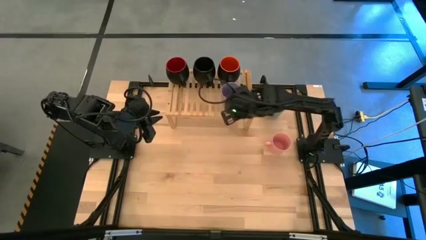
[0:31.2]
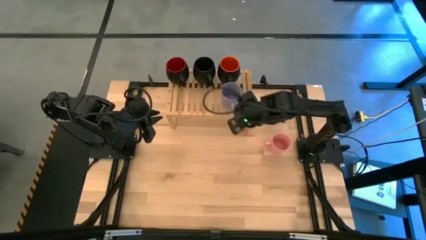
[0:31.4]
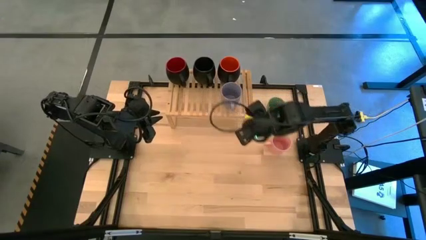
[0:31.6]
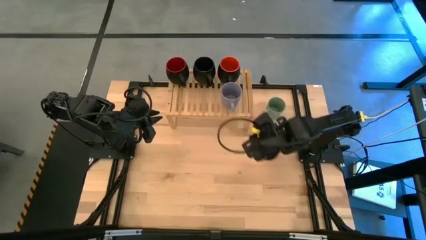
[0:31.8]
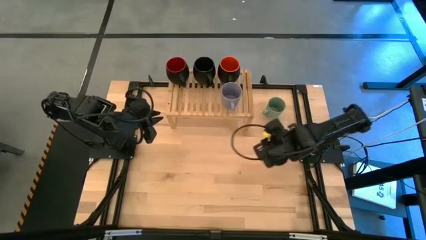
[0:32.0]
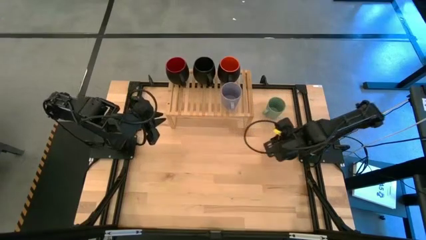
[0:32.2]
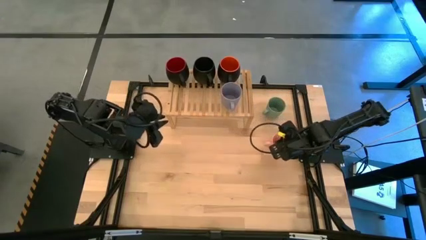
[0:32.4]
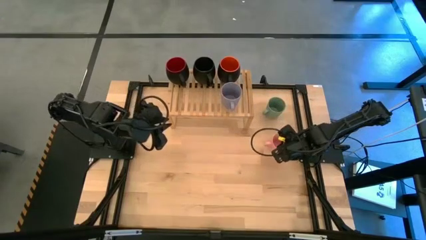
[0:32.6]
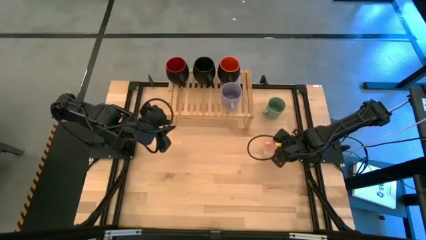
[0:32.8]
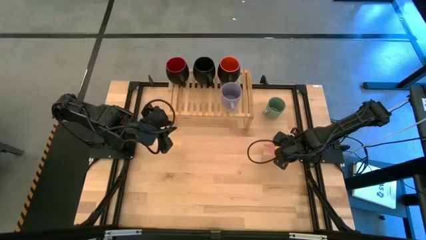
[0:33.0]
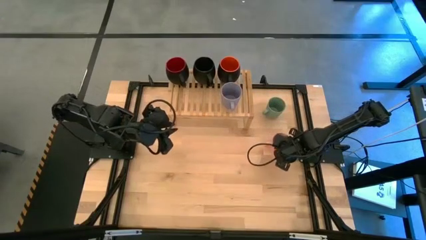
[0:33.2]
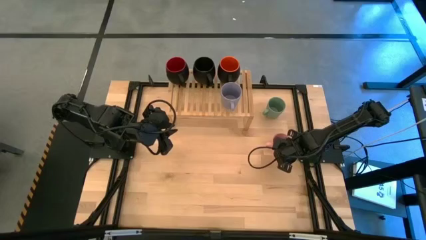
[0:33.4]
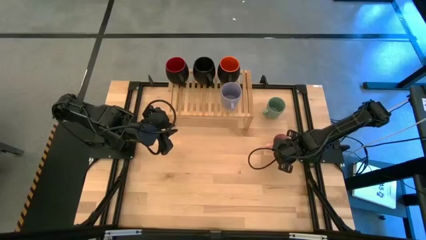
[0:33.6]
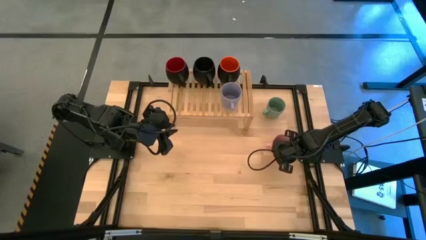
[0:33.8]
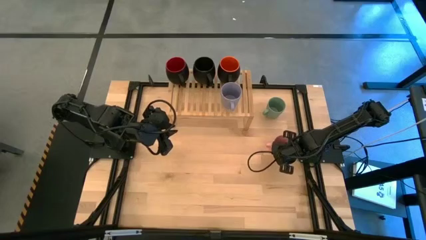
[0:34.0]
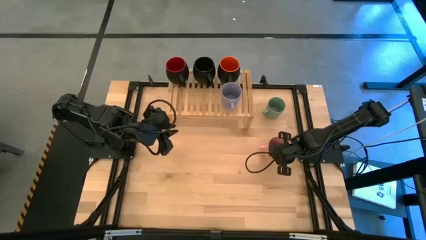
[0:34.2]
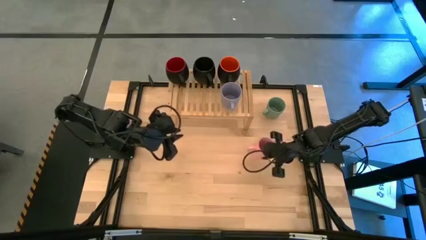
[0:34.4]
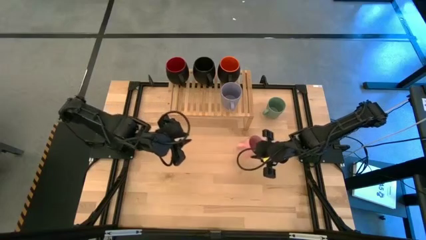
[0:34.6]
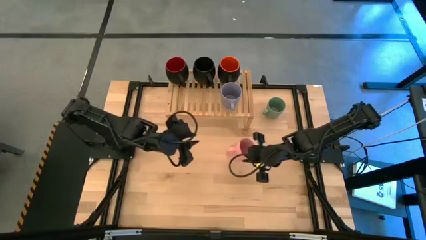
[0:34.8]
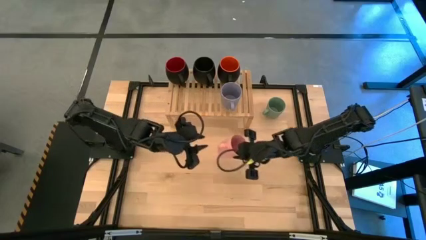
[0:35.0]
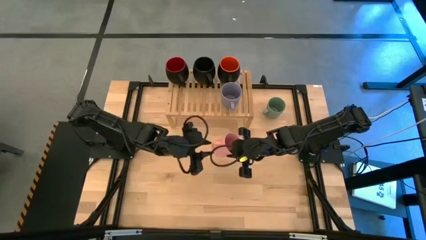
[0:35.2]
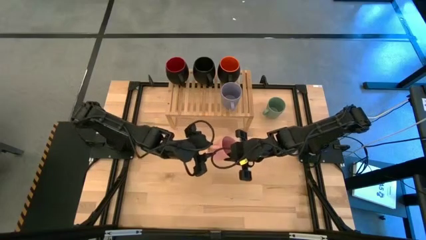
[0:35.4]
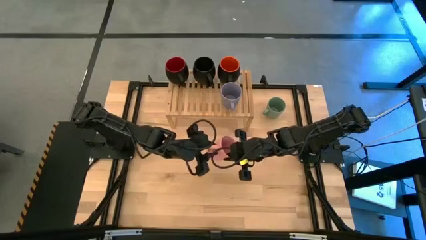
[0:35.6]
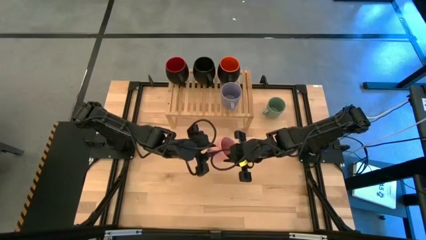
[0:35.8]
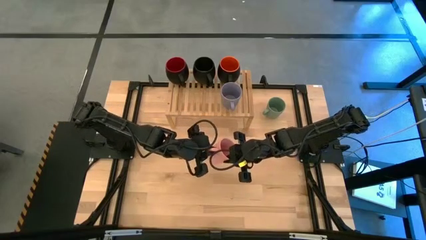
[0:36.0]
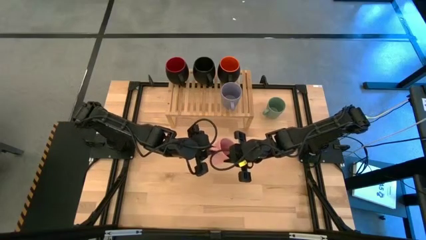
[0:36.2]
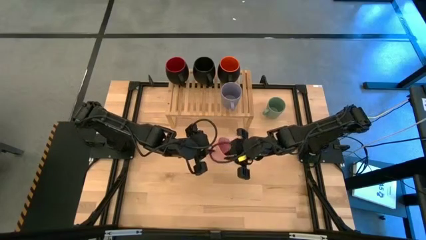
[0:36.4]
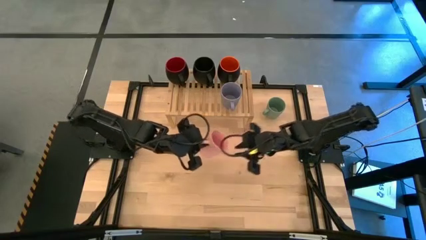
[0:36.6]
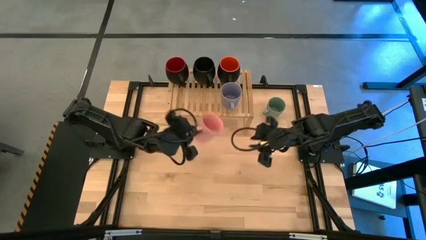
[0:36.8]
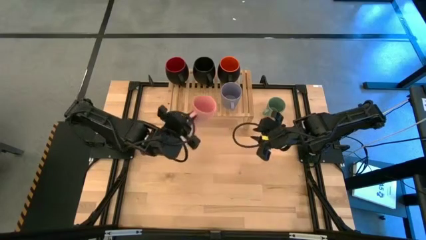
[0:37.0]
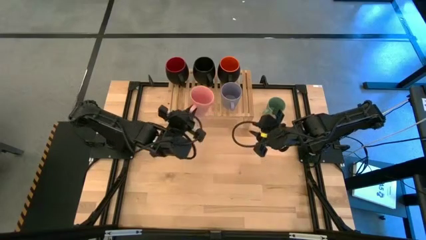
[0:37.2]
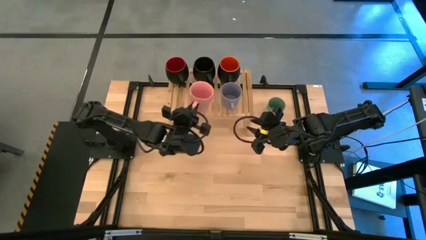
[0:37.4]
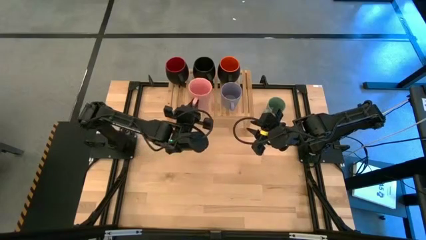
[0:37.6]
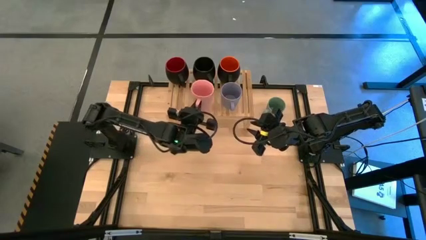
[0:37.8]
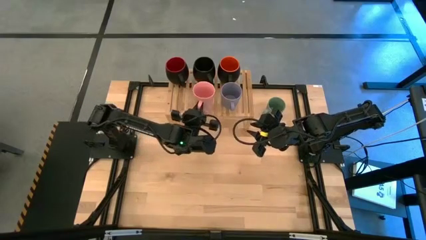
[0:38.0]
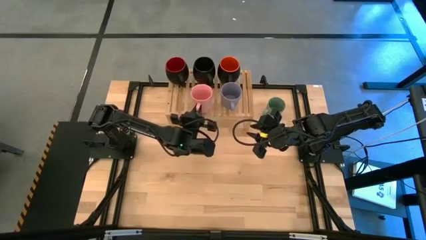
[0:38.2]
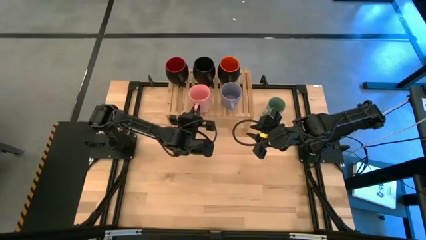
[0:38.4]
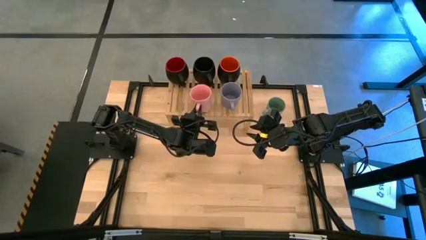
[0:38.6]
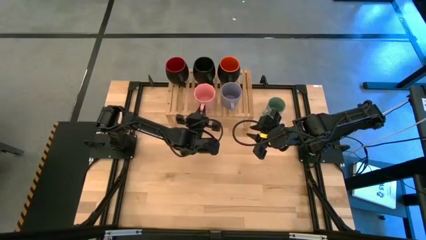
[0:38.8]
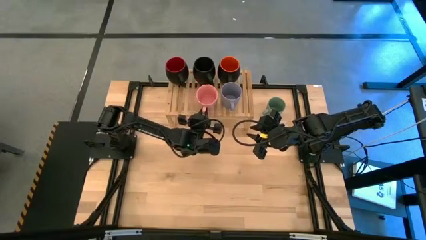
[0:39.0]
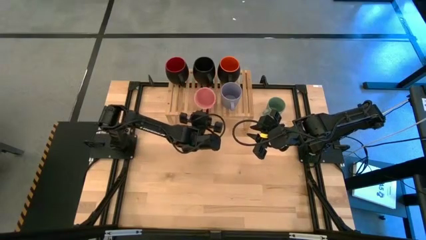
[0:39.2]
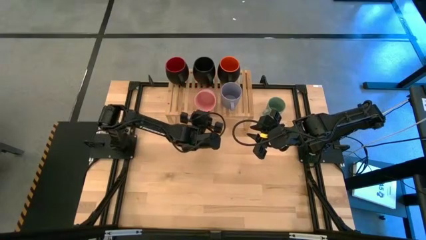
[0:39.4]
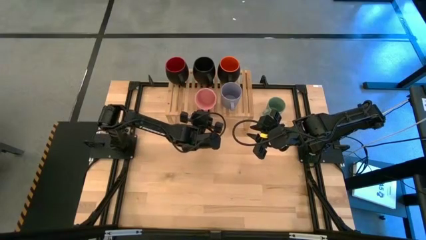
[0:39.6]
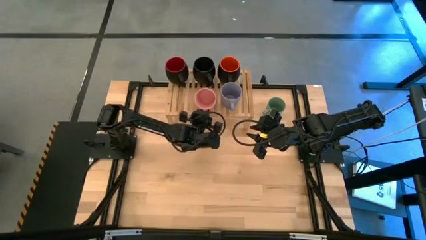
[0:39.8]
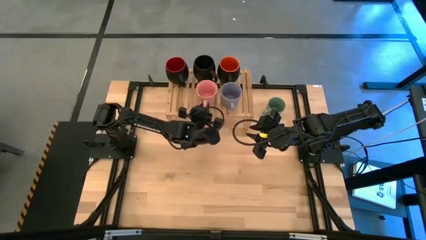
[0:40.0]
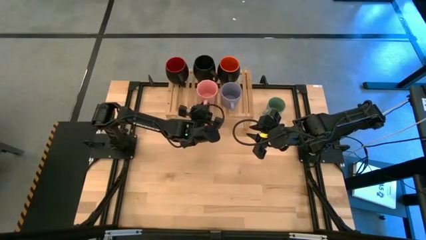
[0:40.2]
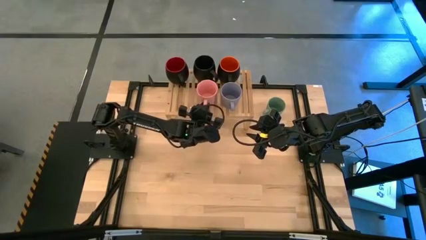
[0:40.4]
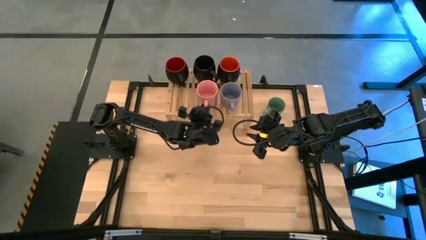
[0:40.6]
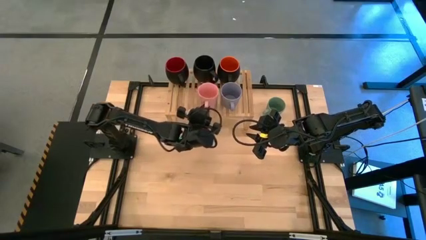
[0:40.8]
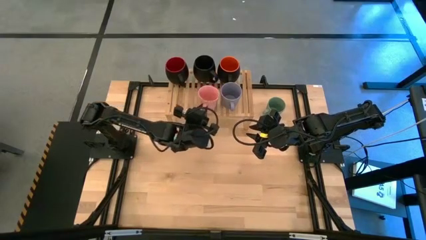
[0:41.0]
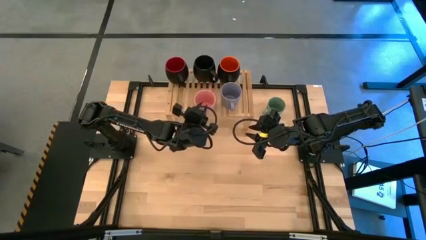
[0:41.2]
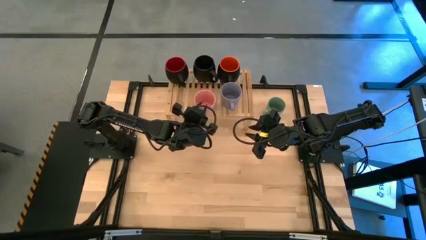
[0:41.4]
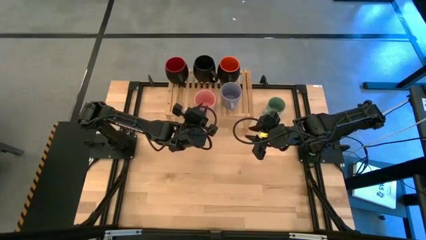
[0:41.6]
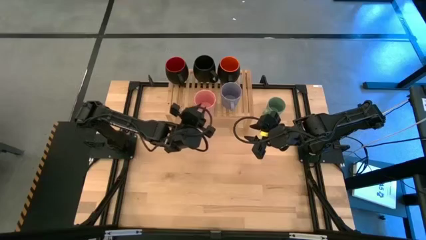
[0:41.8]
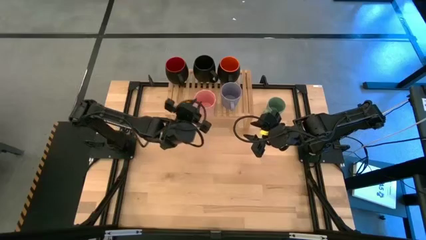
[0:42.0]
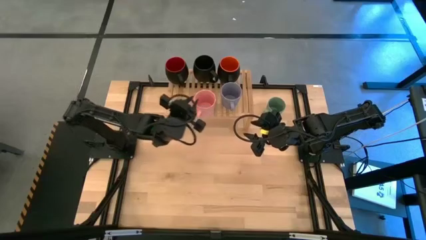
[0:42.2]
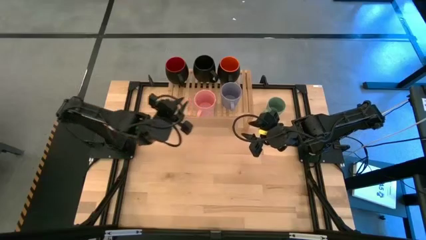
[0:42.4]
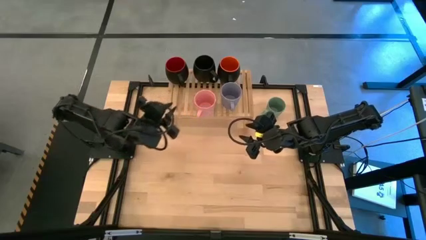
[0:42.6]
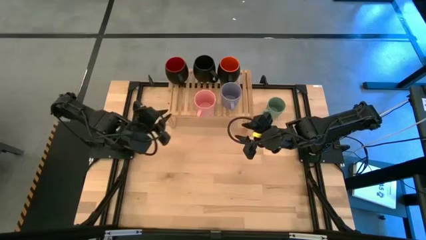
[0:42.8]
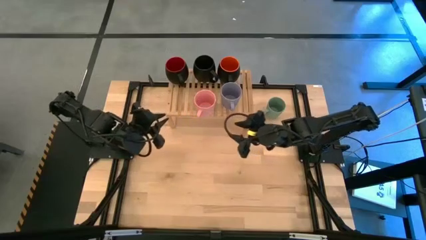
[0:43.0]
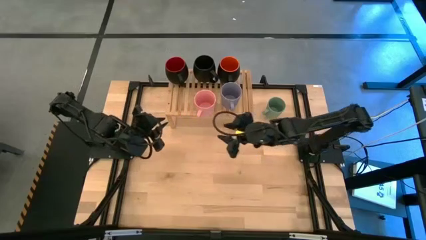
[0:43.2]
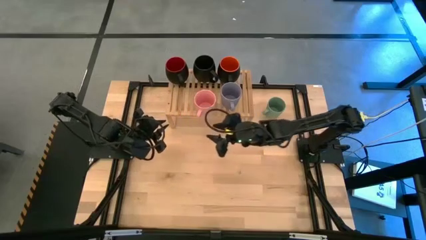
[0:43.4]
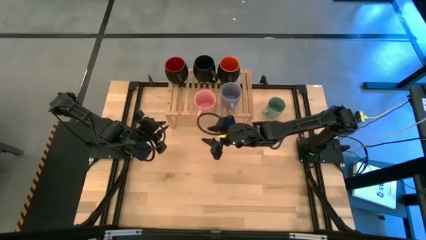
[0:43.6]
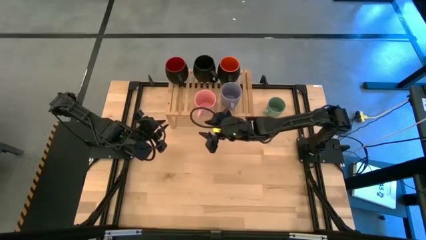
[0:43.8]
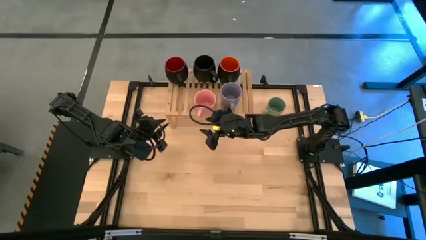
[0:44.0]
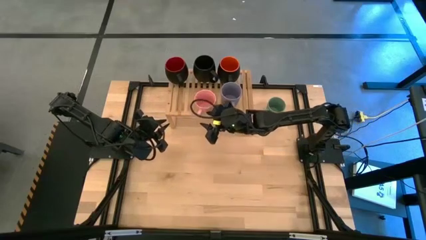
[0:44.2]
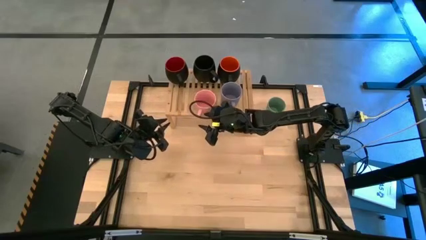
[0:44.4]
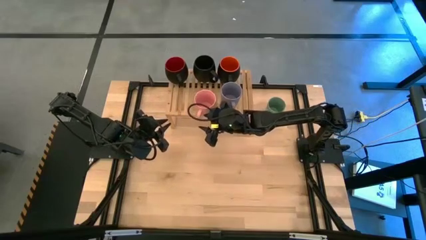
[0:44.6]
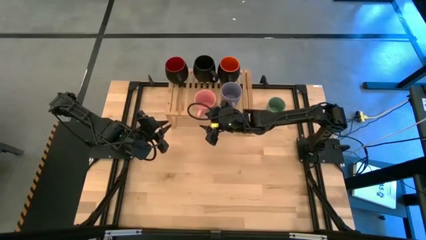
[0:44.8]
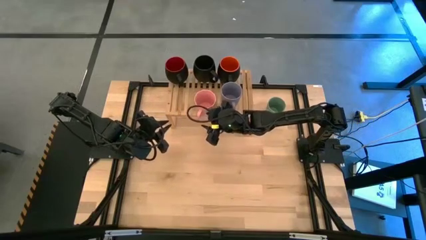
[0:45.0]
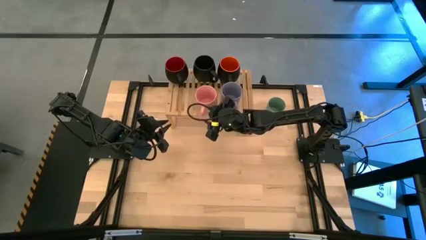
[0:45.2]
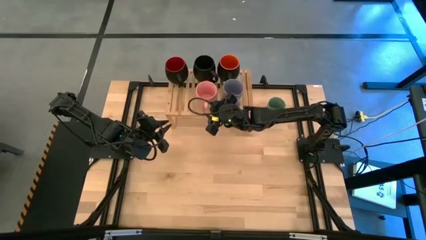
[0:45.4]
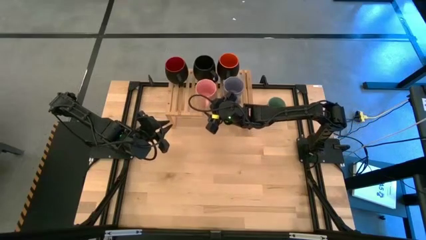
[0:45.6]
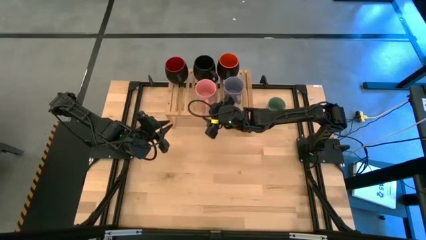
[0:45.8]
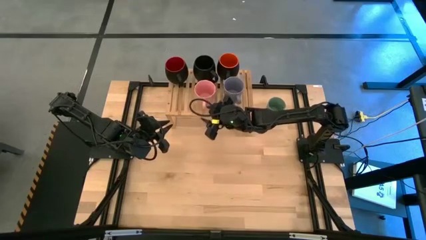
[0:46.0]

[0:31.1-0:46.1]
Task: Place coffee mugs
Put the pink mug on the shelf
